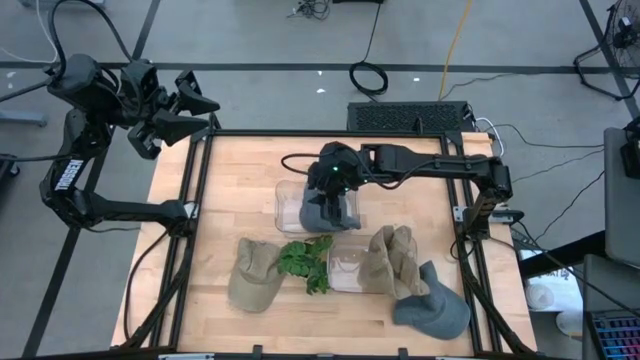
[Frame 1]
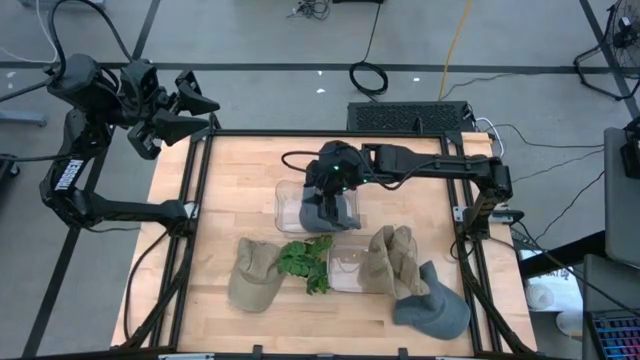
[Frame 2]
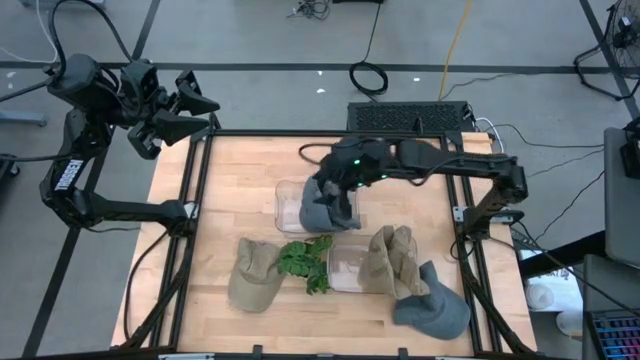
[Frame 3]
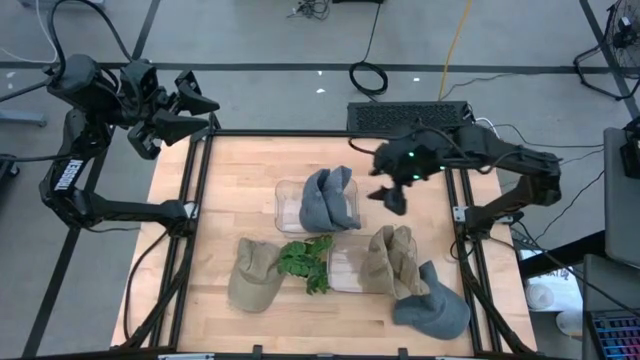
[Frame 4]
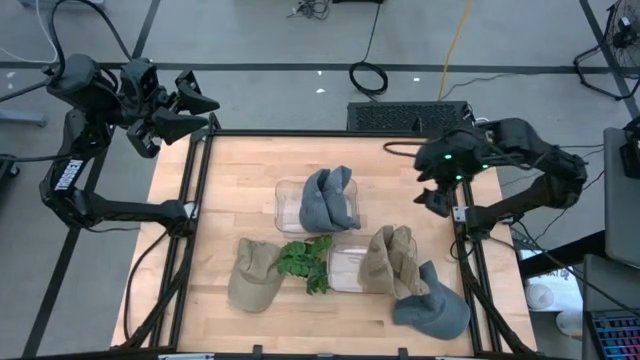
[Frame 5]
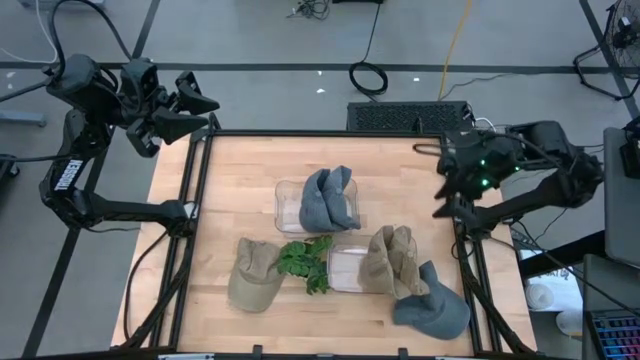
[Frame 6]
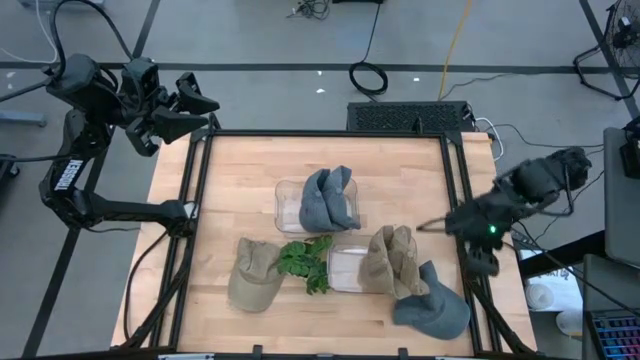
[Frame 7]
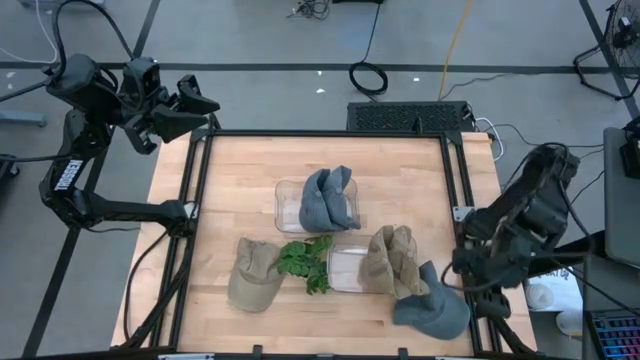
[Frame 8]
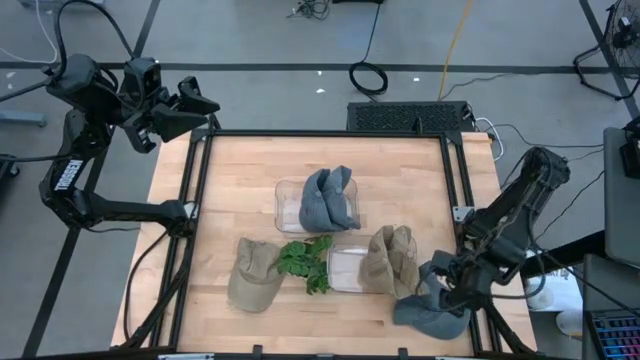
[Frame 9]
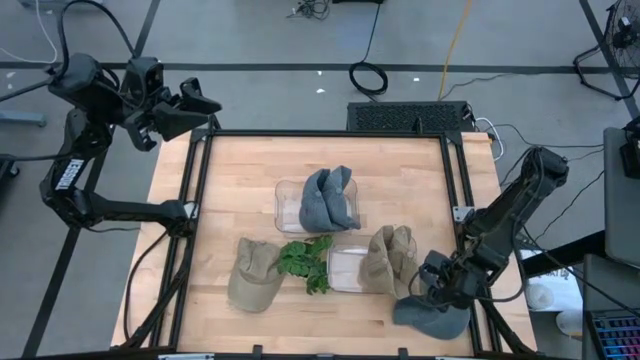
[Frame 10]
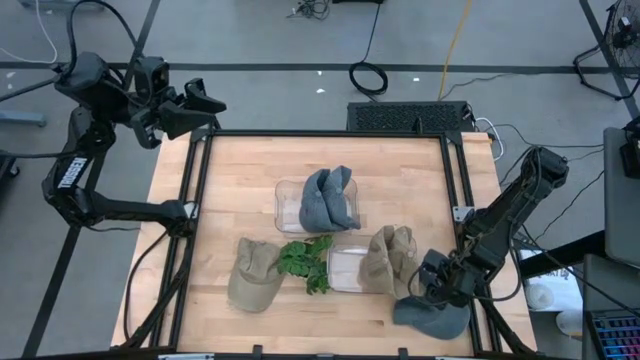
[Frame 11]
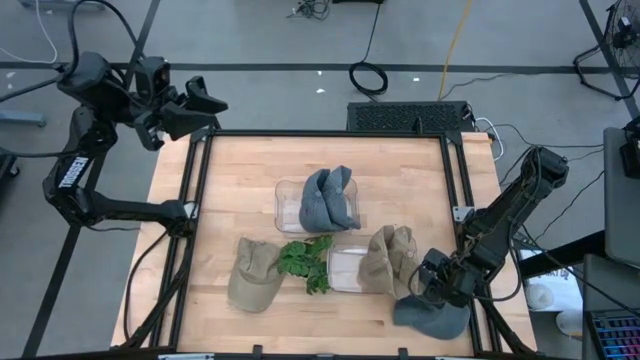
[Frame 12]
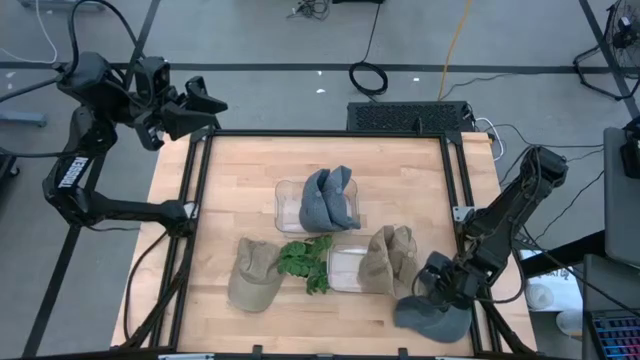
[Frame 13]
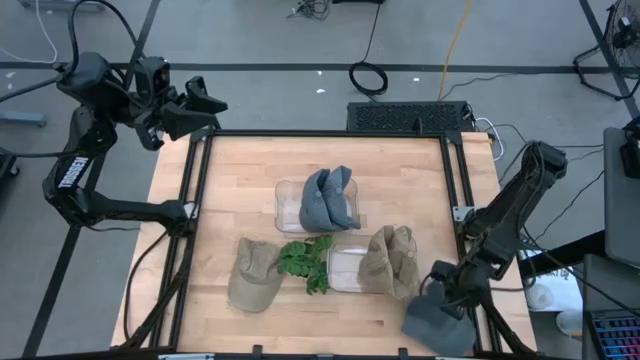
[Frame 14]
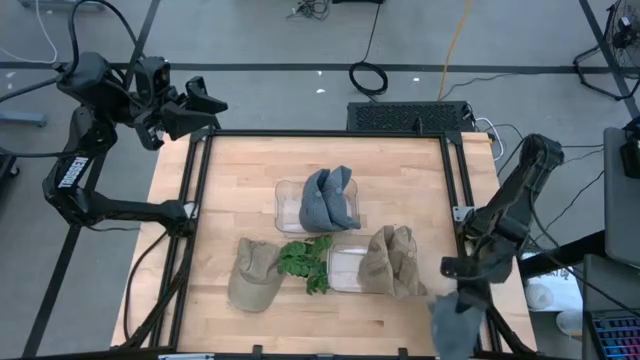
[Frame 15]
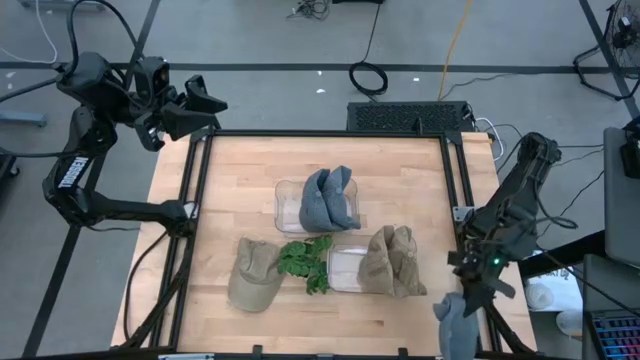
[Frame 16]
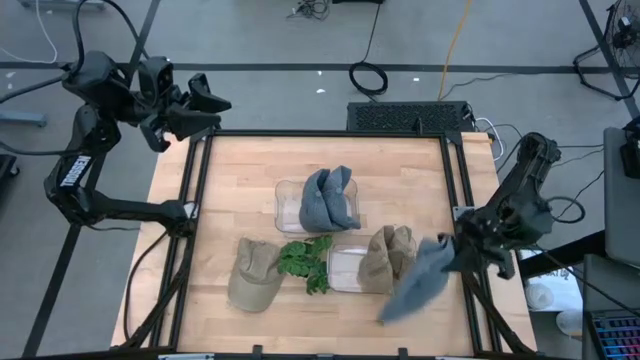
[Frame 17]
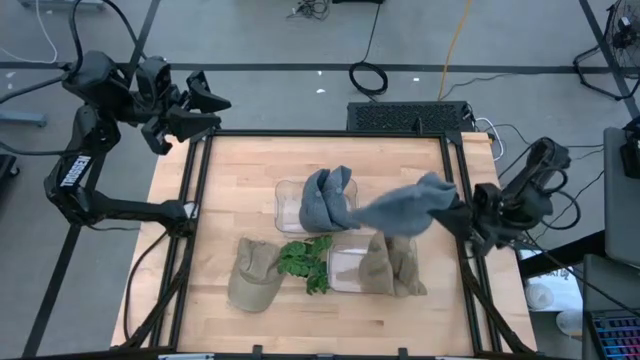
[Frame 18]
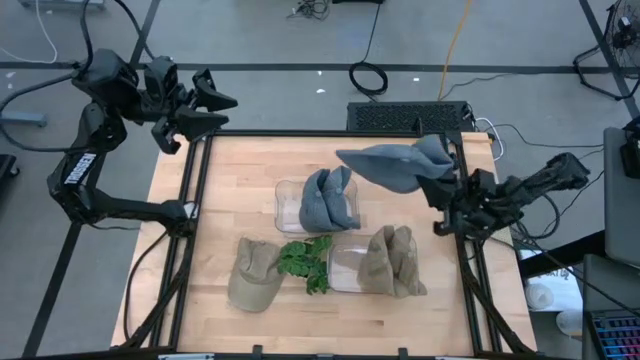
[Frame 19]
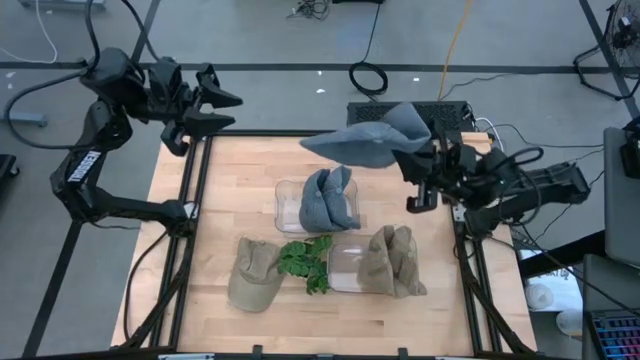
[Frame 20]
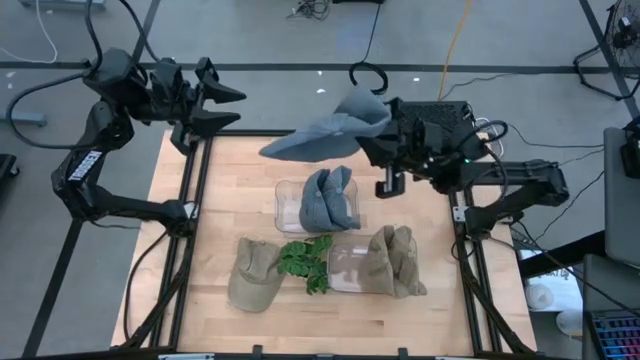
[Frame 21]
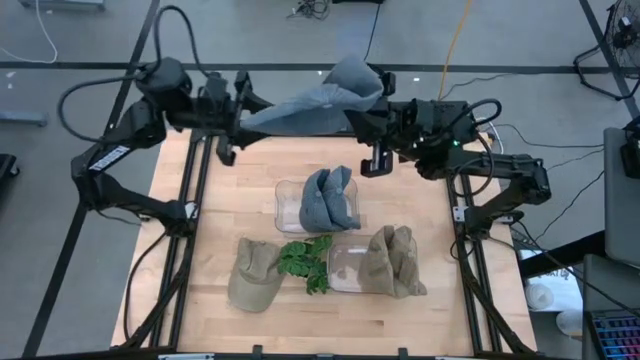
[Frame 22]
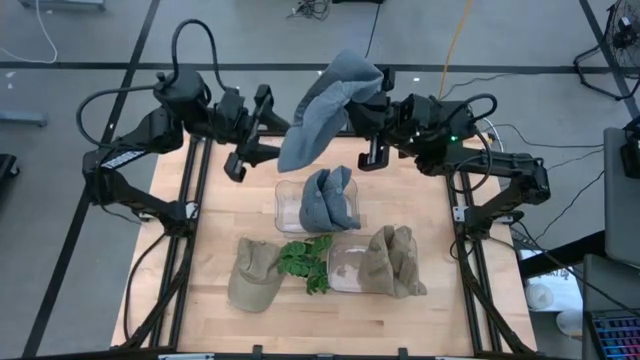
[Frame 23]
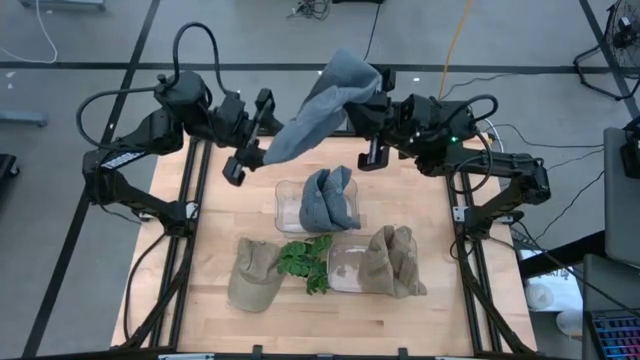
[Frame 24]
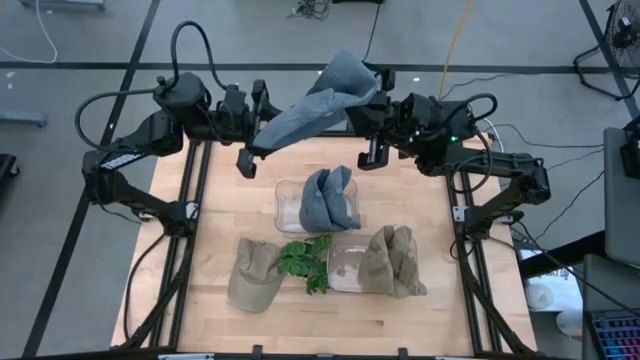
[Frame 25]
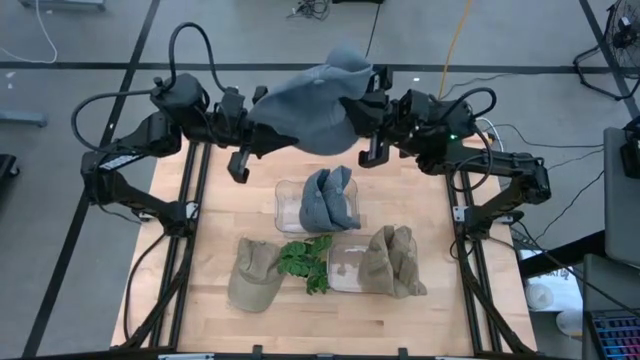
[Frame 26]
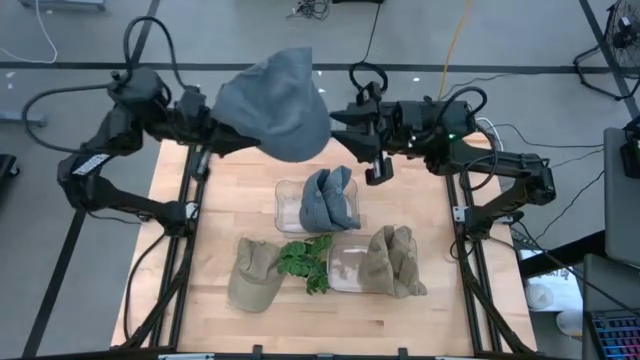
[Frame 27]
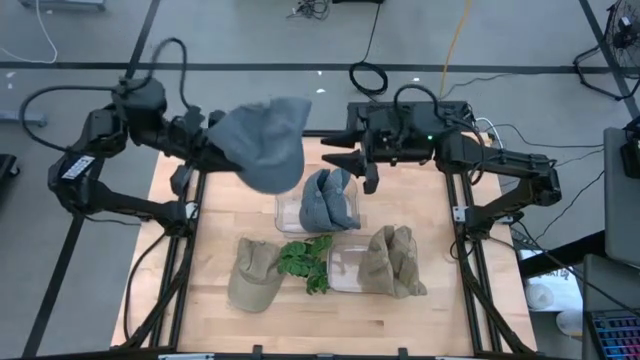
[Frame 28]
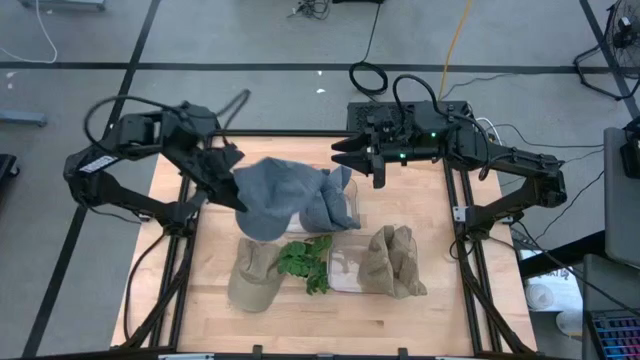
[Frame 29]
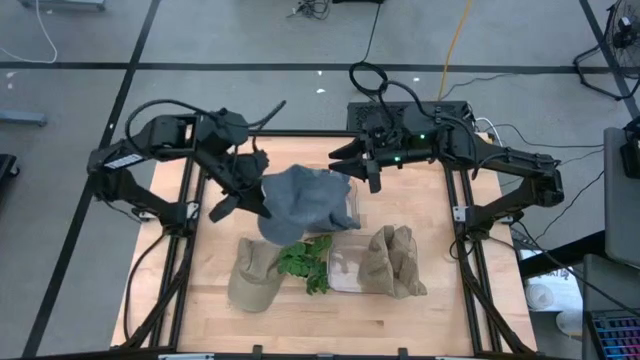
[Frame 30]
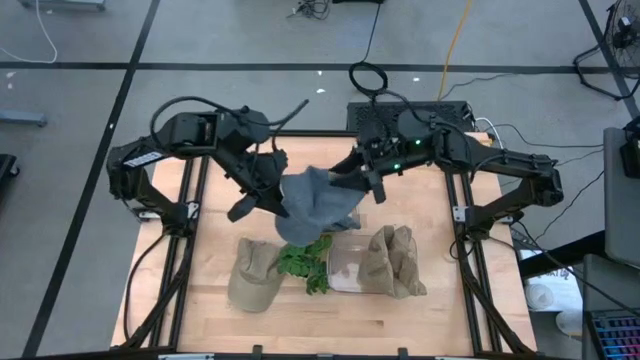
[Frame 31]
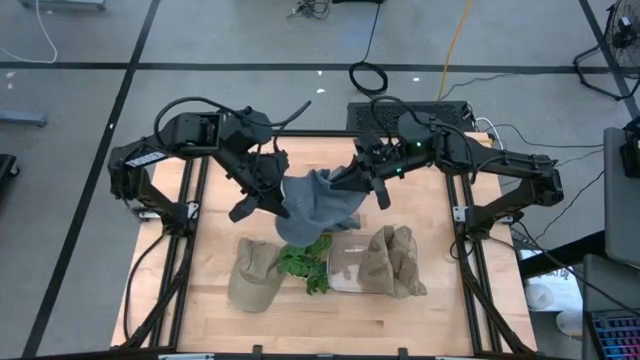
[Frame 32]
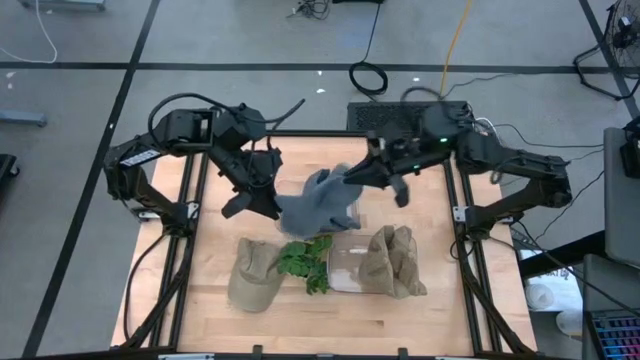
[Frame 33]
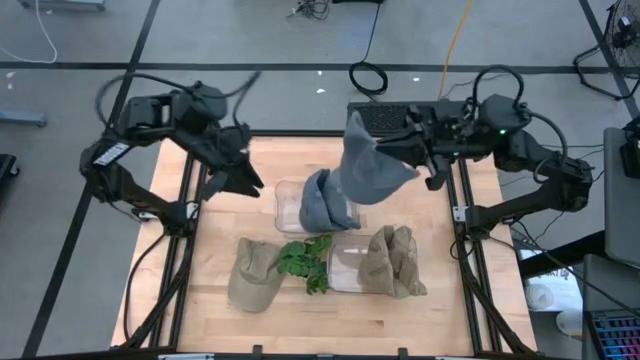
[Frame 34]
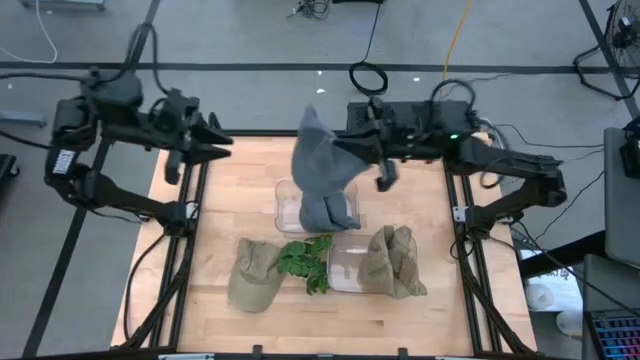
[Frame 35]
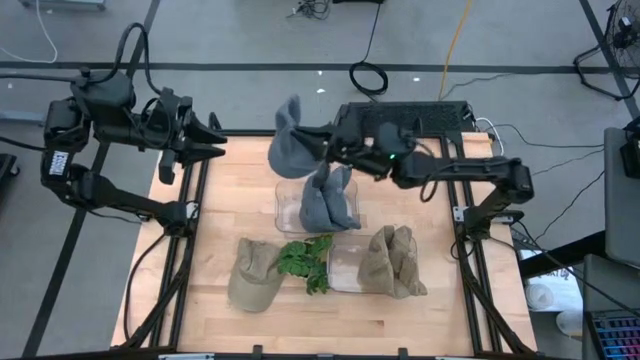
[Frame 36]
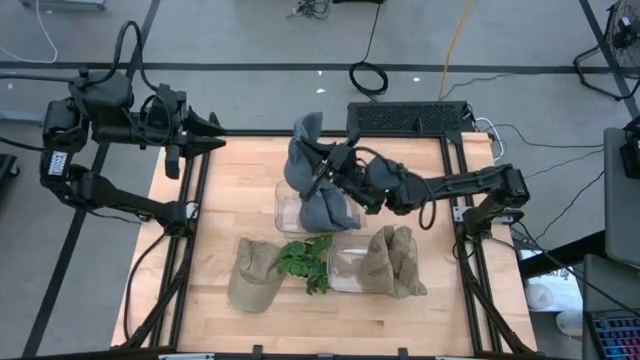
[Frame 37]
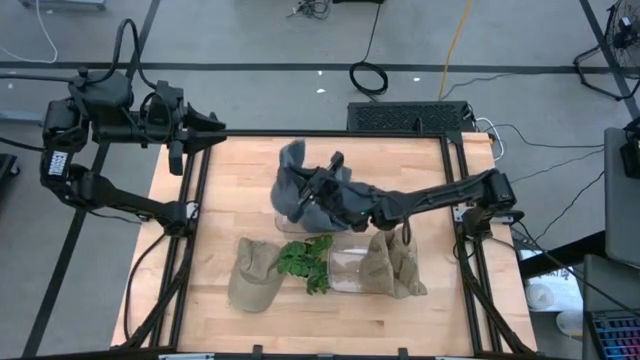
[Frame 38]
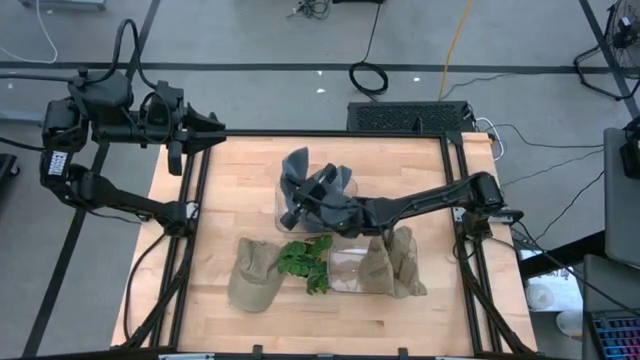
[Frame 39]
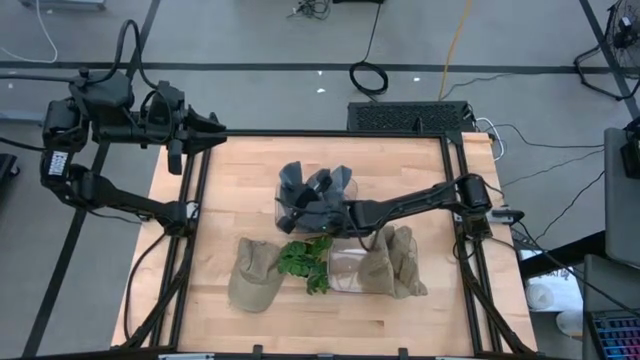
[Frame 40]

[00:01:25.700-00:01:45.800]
Task: Pick & Place hat
Put the gray cap into the top transparent bin
